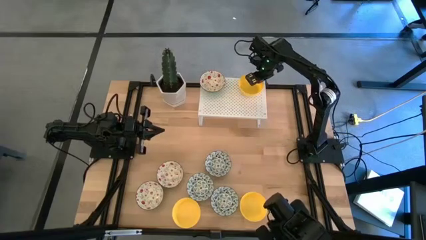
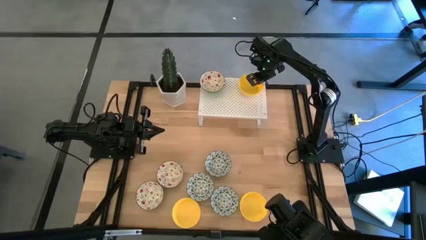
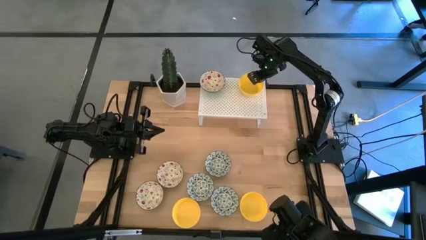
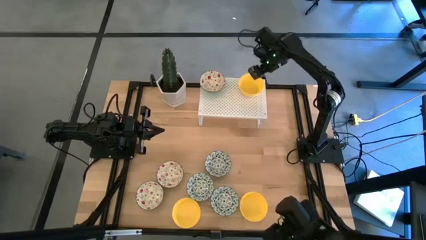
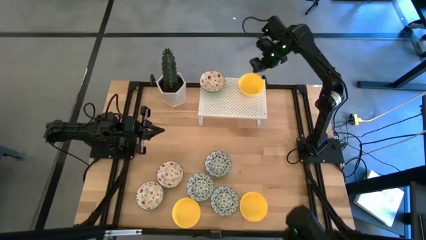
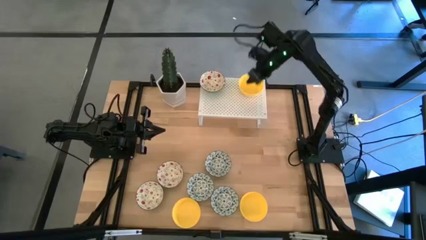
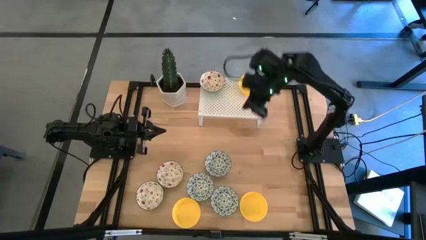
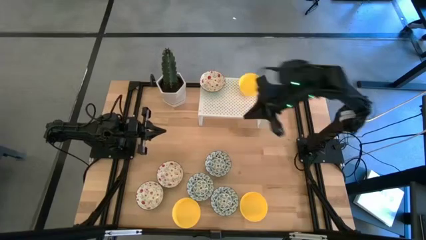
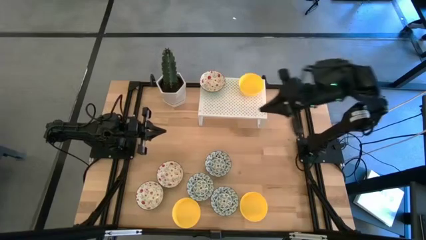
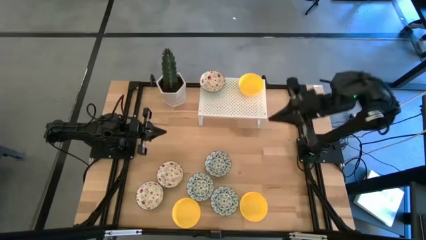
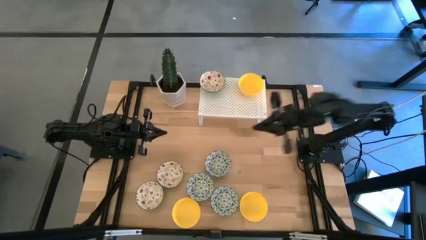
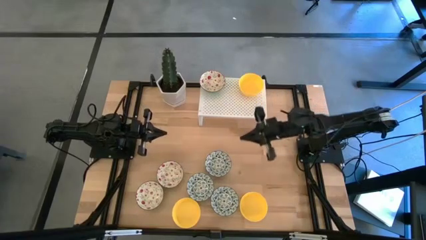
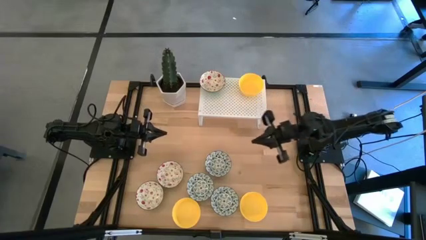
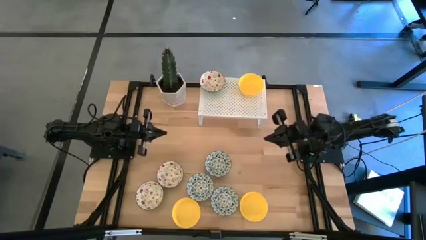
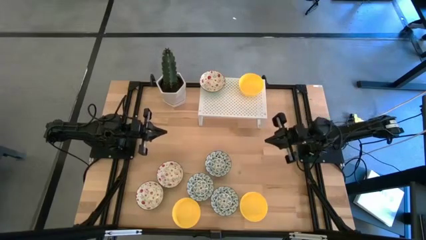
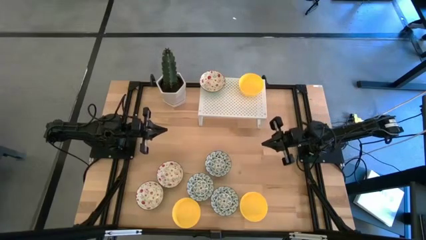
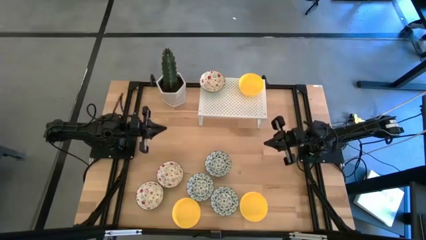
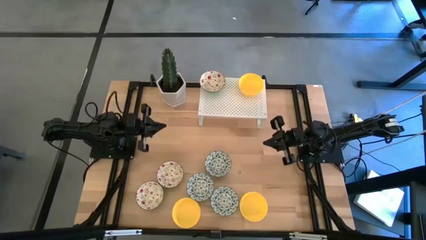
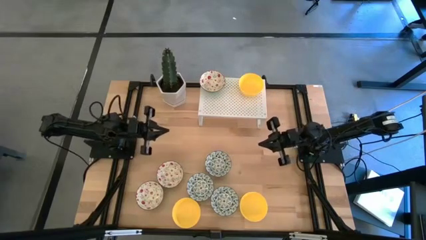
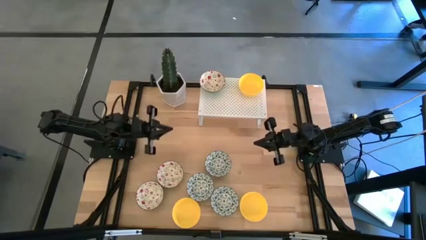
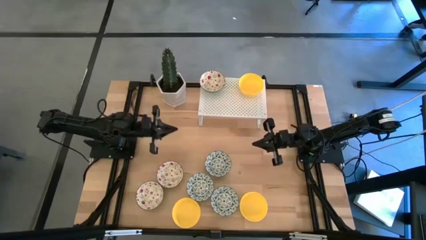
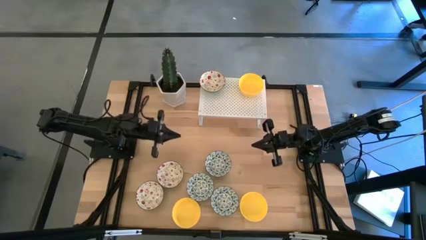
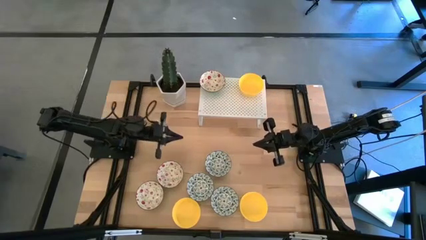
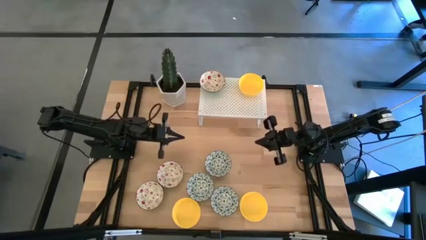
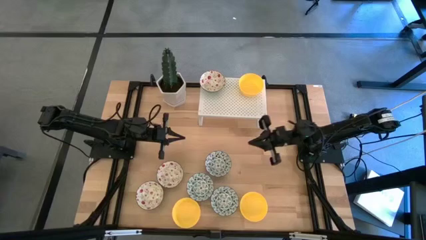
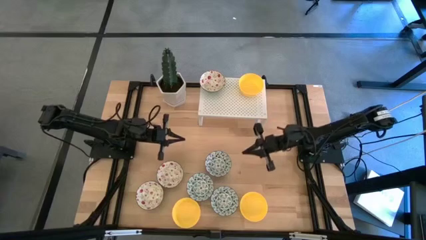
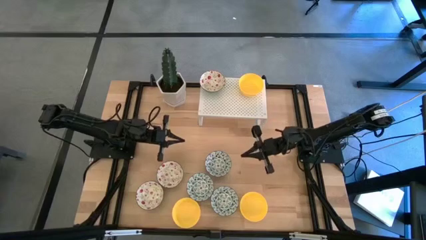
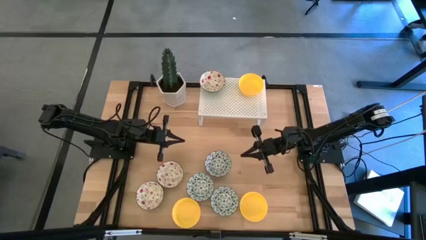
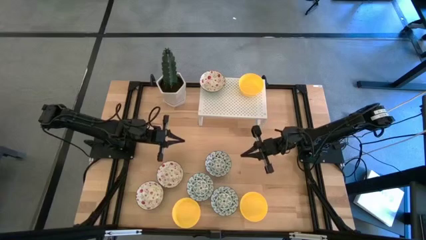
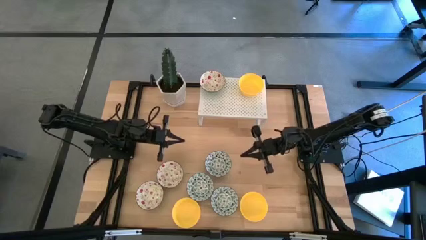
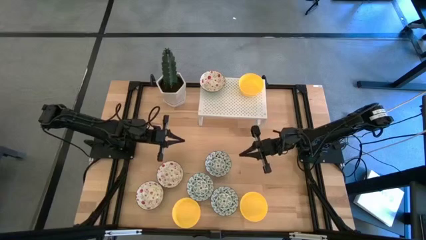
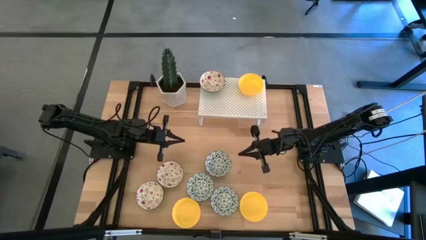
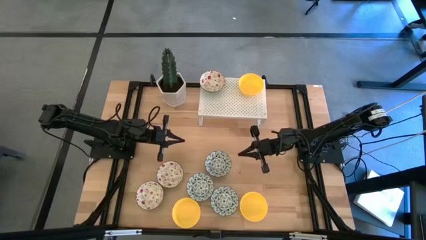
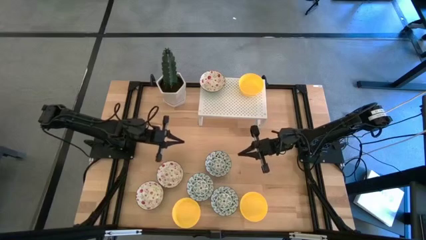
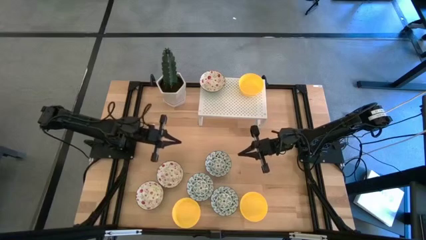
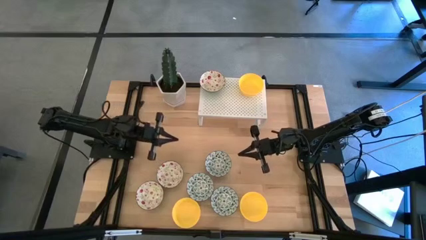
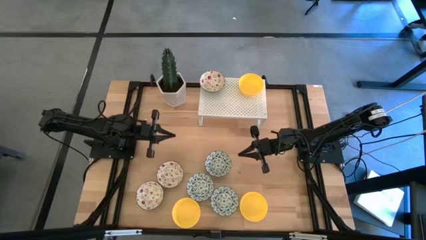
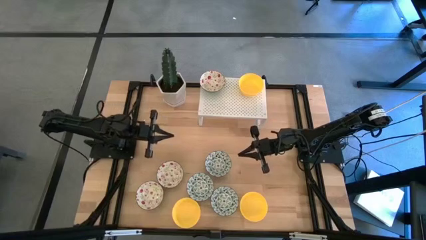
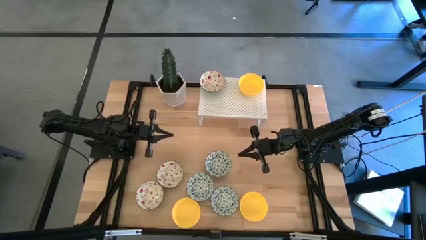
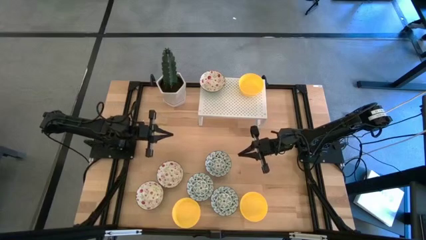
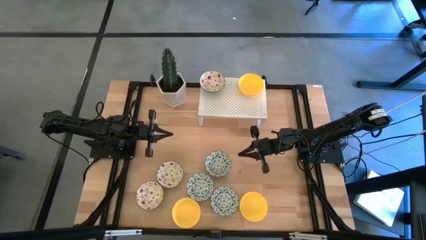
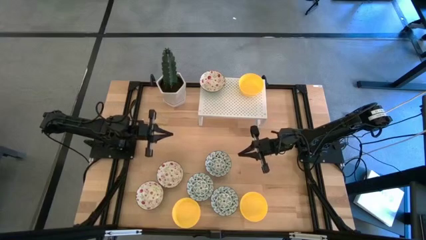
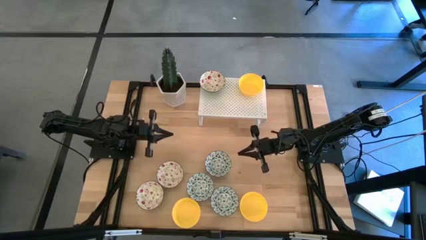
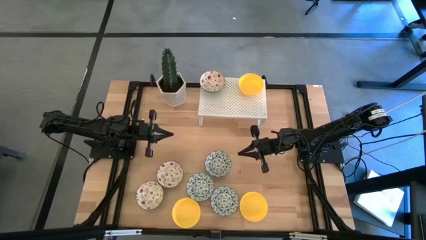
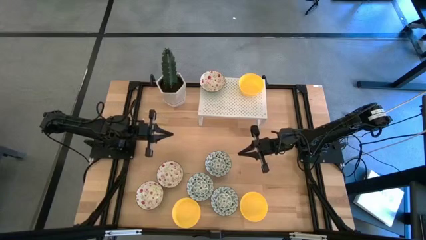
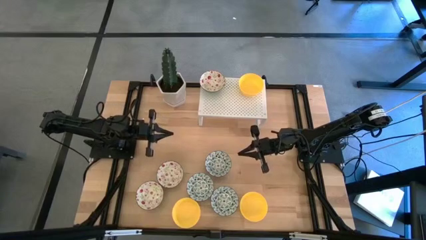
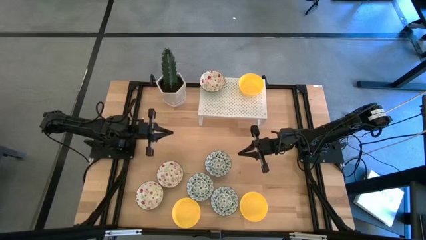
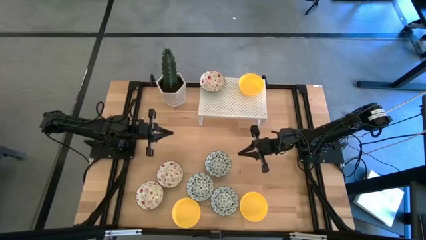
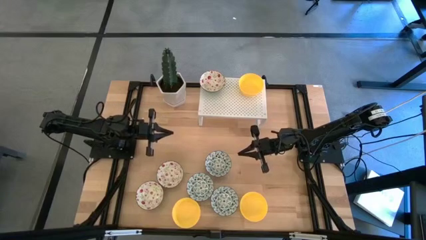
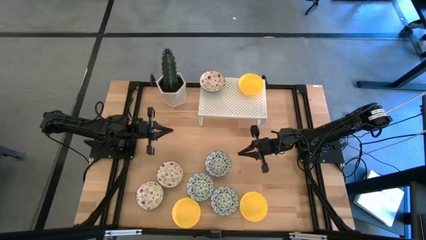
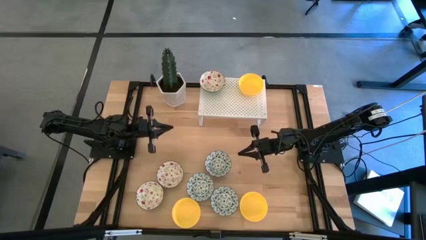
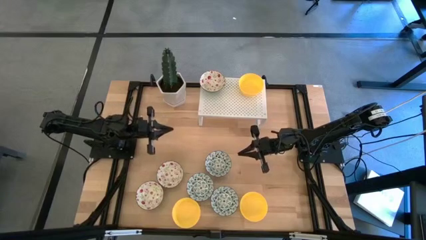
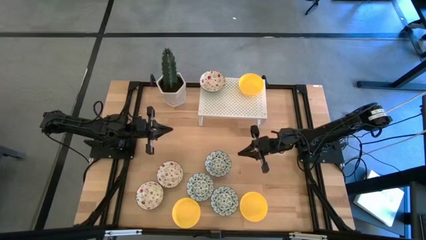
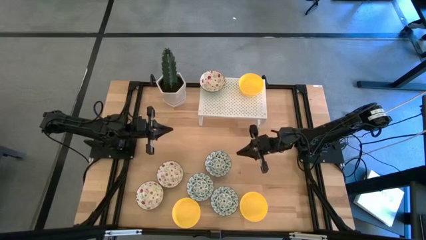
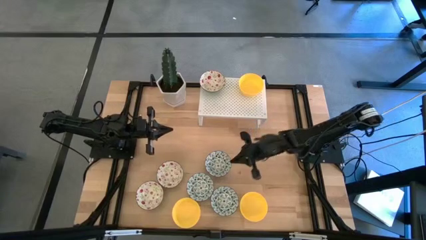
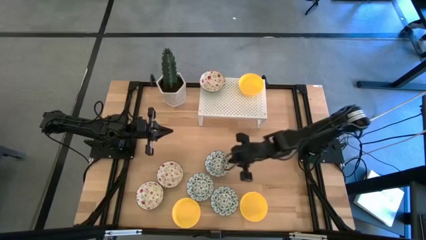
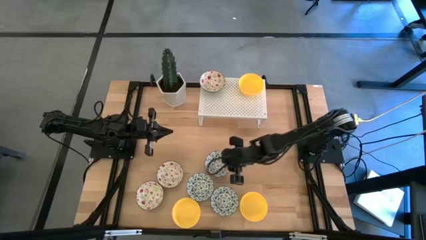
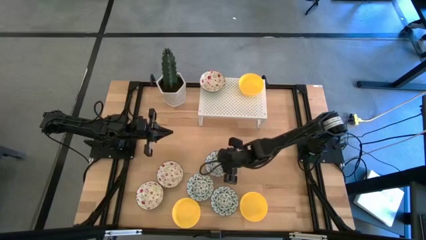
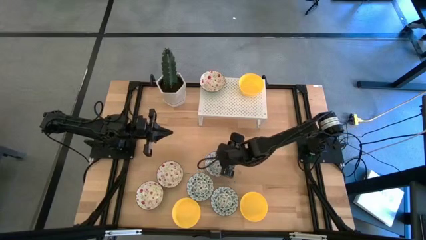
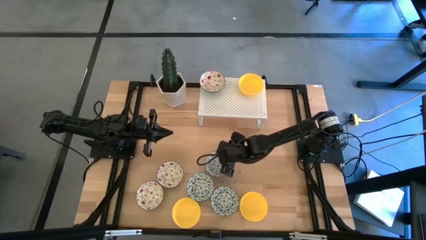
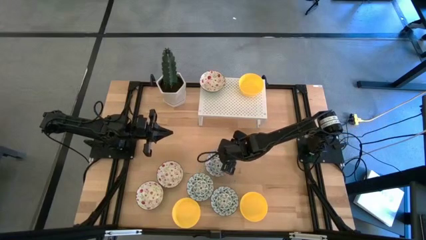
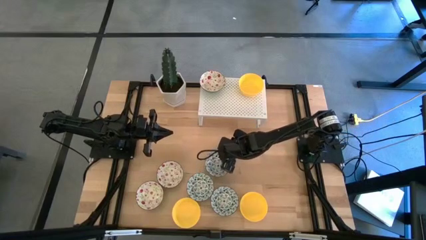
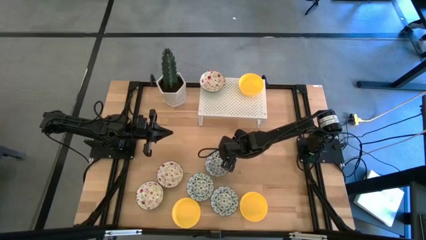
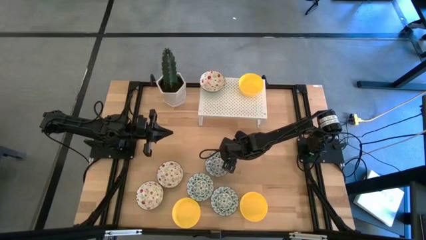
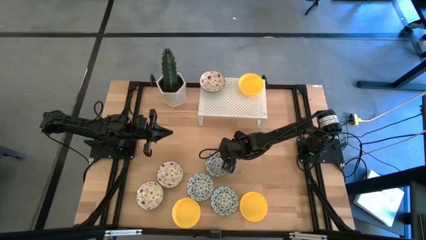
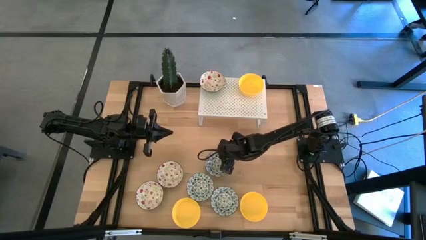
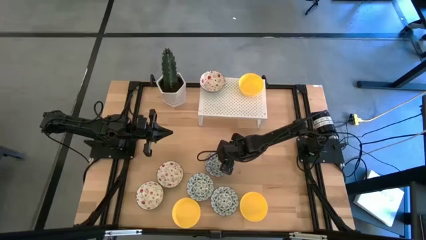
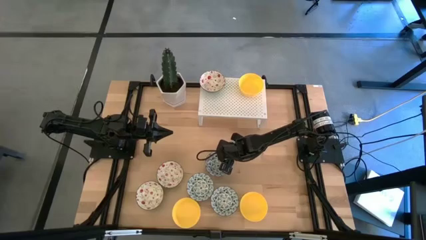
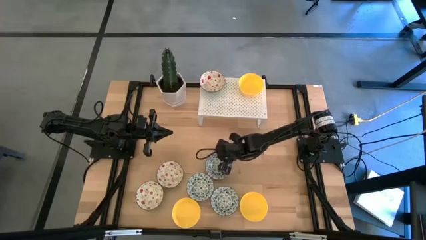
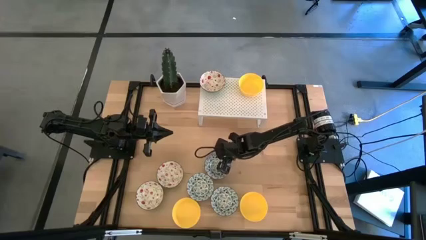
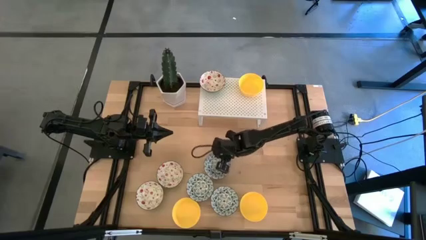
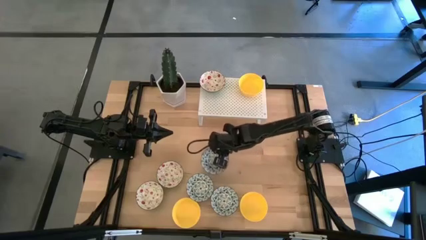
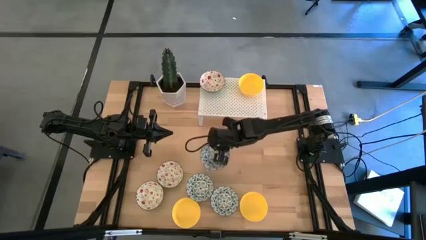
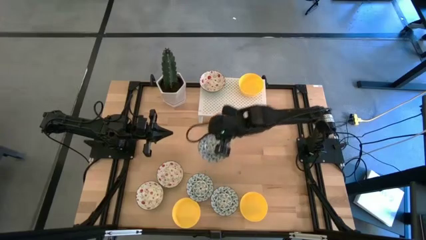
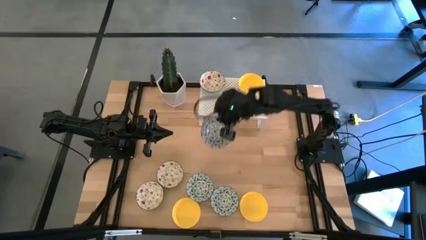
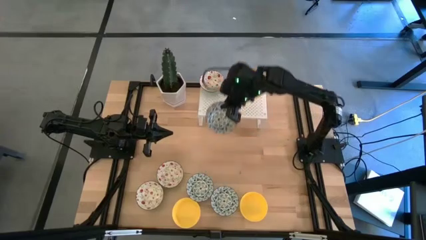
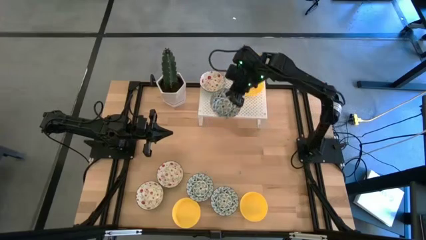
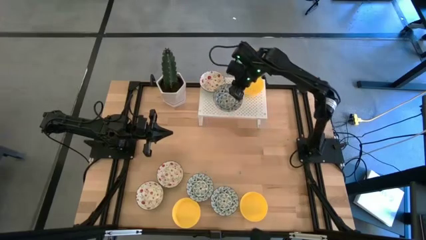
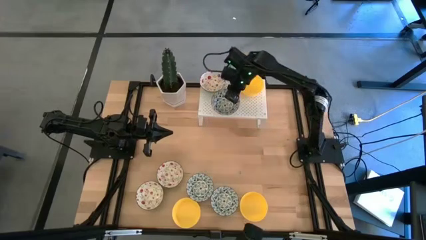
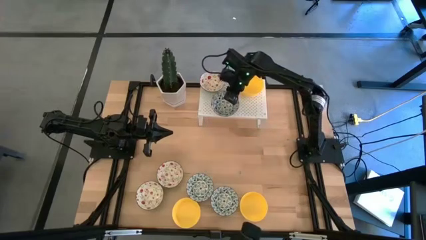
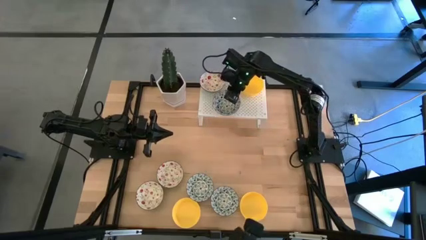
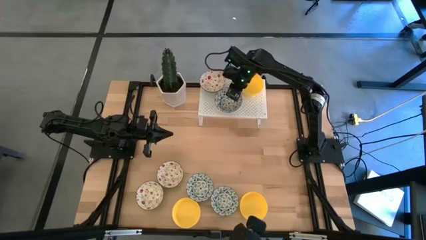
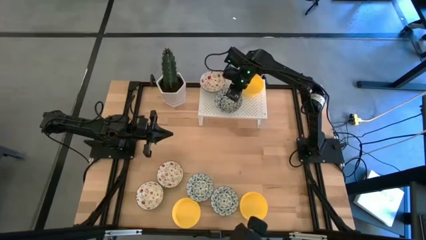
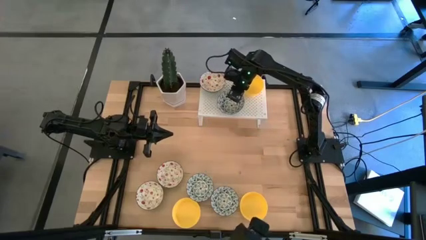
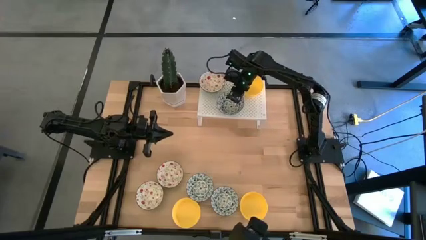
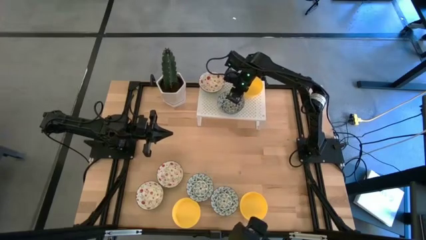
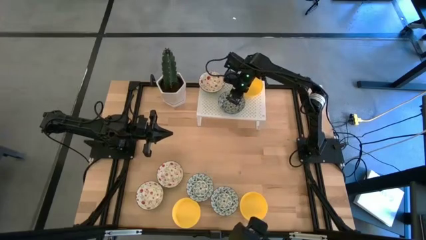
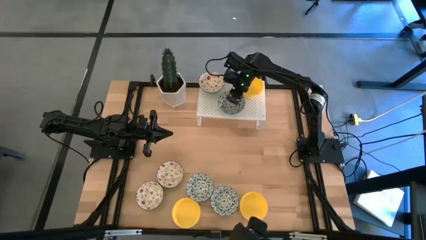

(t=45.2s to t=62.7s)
Task: Pick & Place Mini bowls
Put the top right green patterned bowl on the shelf
